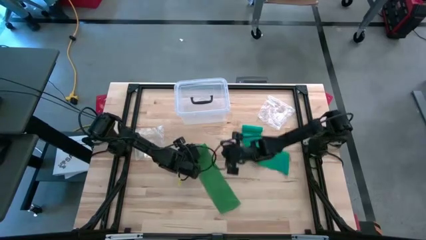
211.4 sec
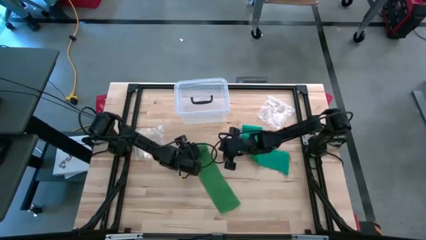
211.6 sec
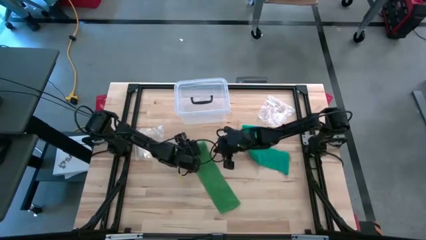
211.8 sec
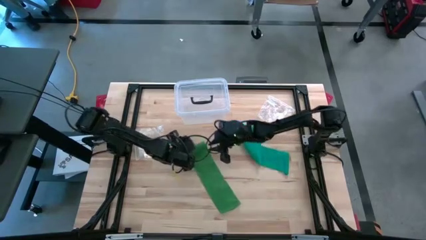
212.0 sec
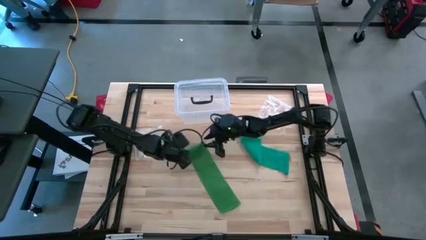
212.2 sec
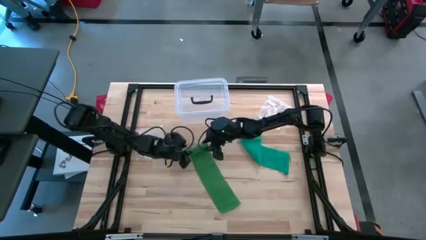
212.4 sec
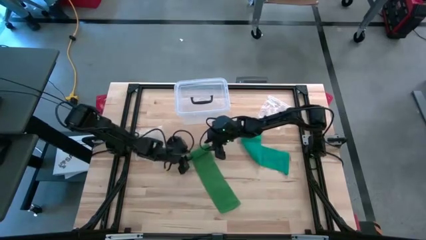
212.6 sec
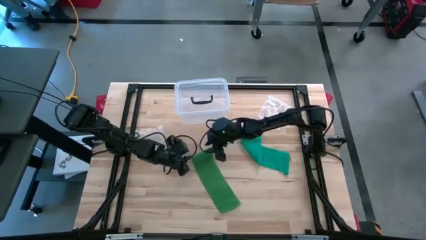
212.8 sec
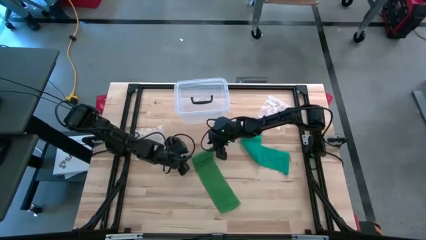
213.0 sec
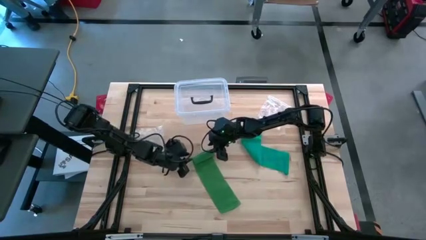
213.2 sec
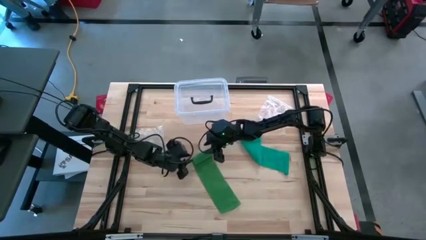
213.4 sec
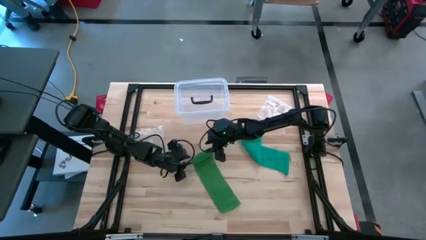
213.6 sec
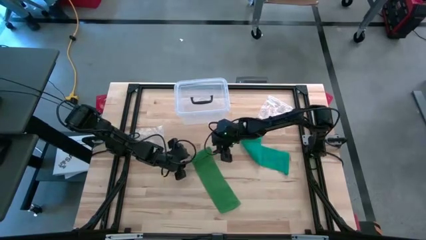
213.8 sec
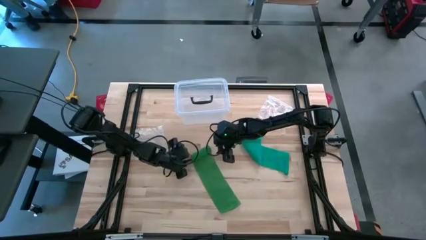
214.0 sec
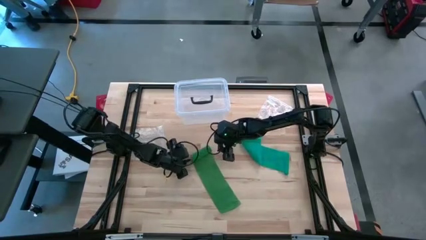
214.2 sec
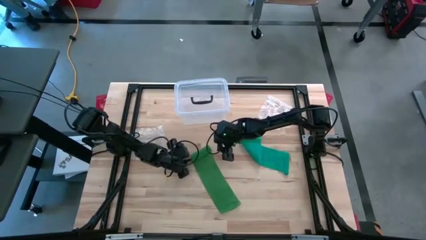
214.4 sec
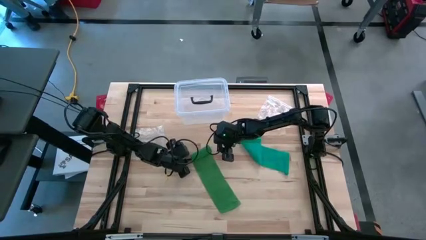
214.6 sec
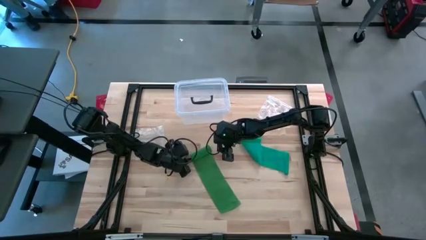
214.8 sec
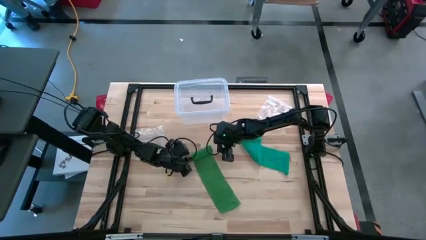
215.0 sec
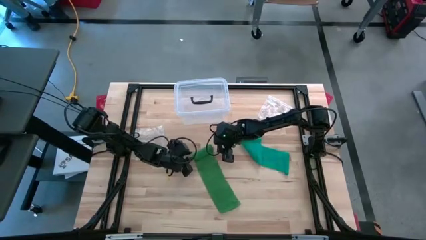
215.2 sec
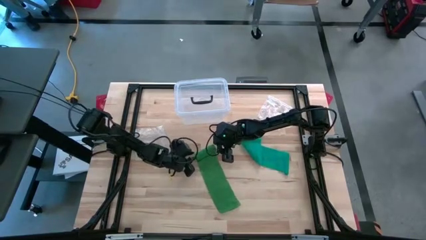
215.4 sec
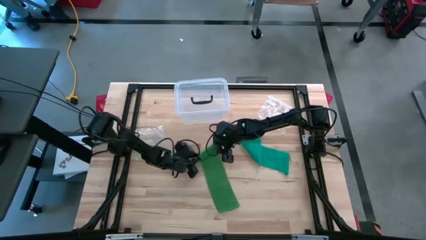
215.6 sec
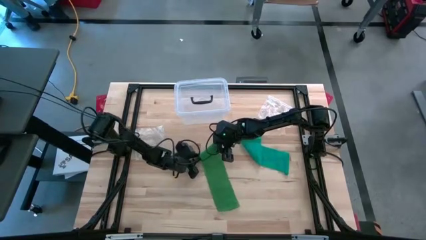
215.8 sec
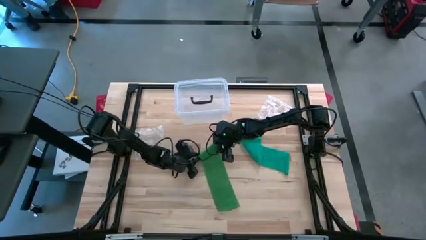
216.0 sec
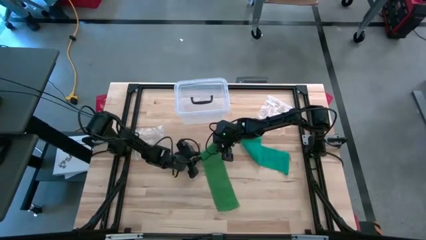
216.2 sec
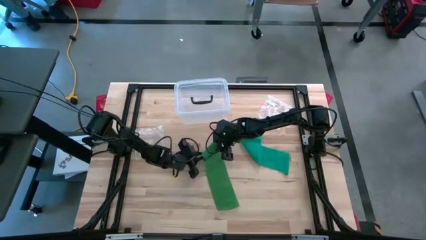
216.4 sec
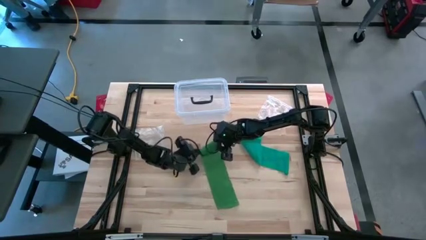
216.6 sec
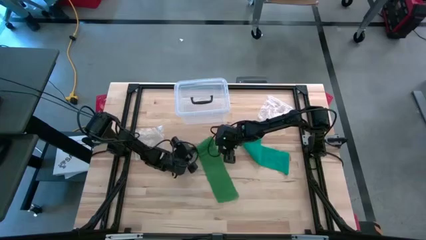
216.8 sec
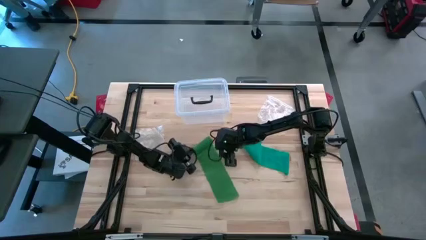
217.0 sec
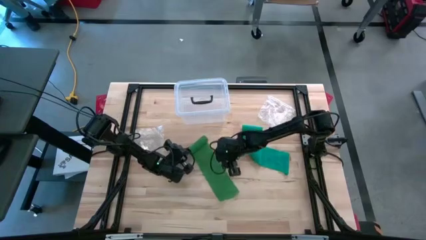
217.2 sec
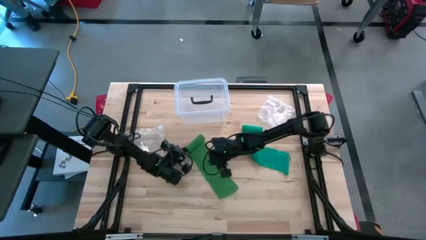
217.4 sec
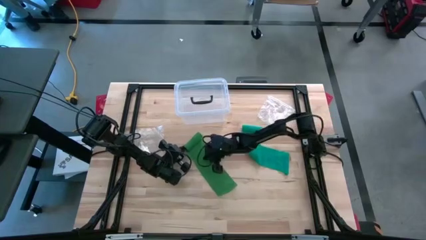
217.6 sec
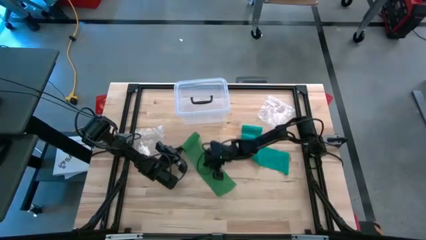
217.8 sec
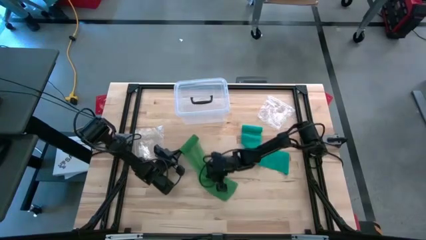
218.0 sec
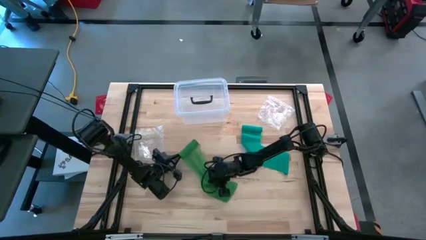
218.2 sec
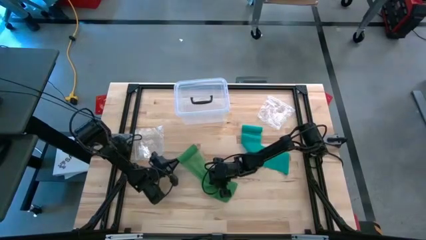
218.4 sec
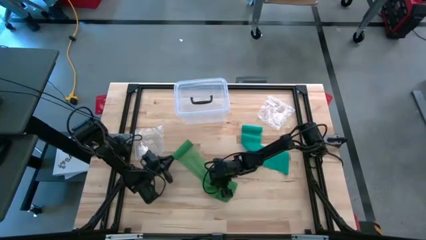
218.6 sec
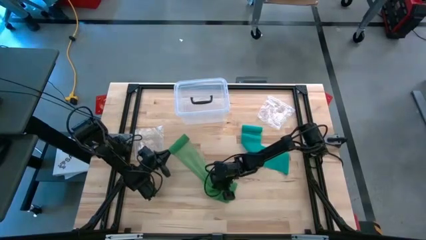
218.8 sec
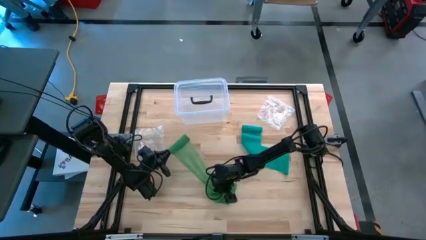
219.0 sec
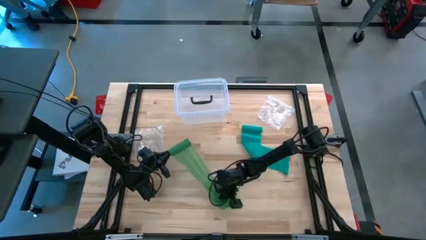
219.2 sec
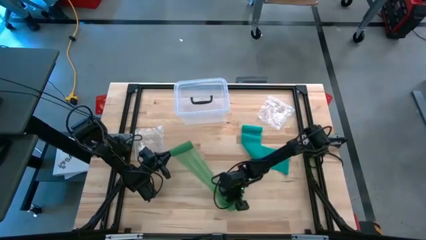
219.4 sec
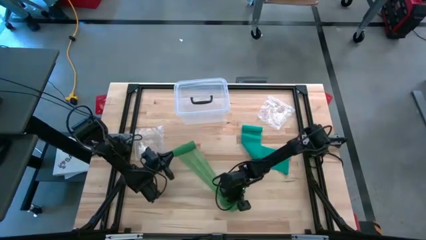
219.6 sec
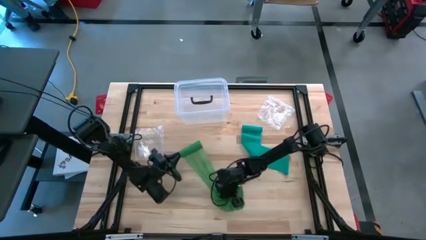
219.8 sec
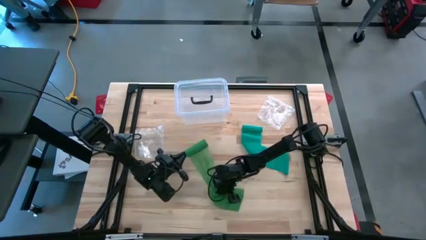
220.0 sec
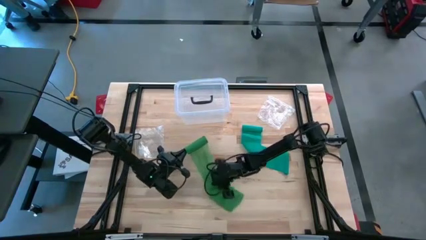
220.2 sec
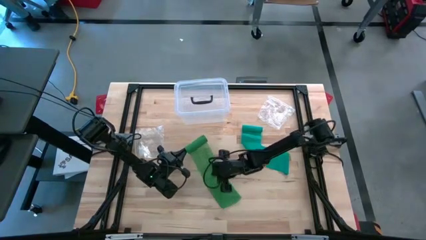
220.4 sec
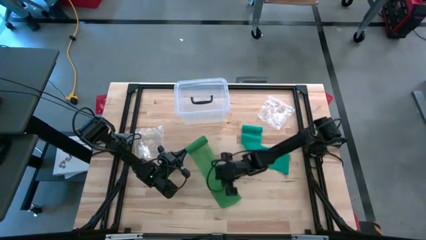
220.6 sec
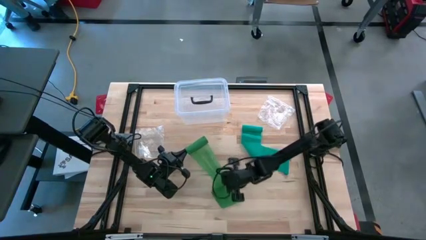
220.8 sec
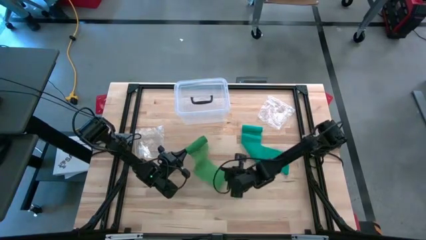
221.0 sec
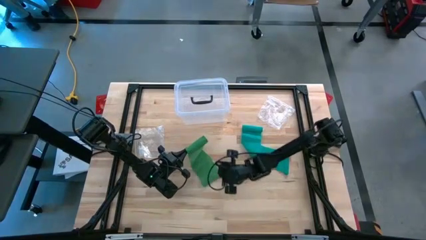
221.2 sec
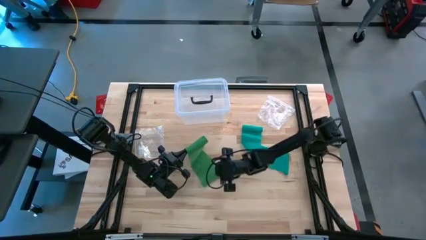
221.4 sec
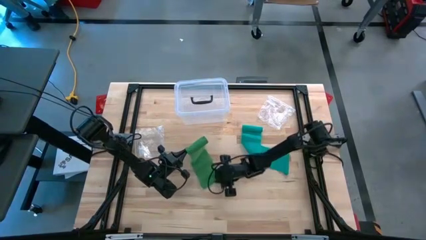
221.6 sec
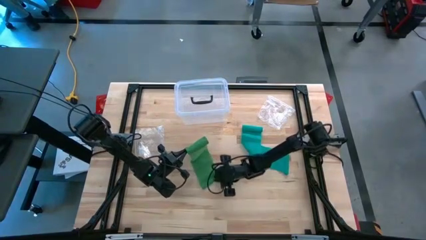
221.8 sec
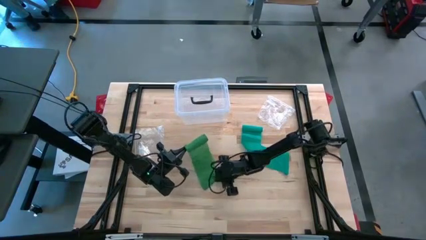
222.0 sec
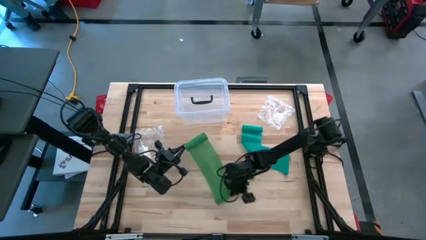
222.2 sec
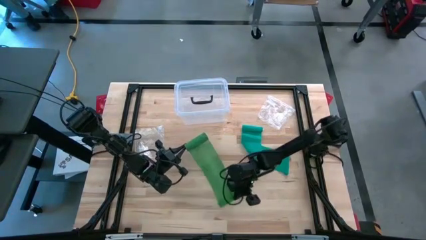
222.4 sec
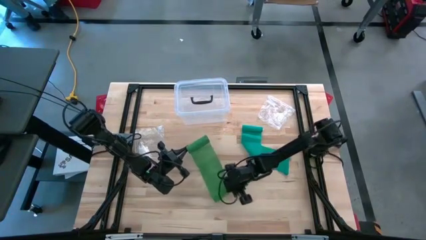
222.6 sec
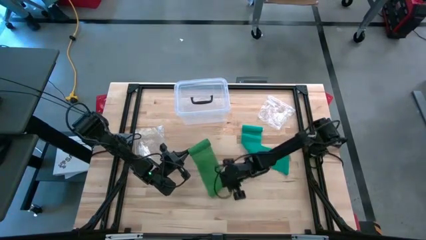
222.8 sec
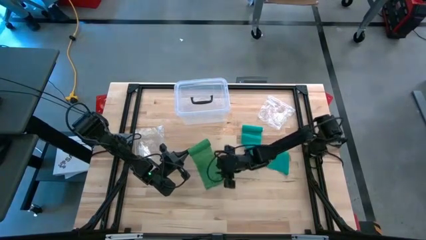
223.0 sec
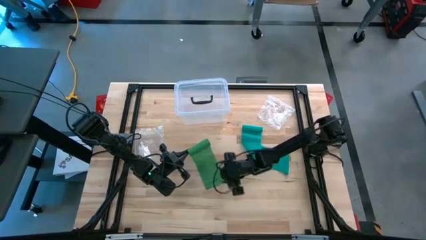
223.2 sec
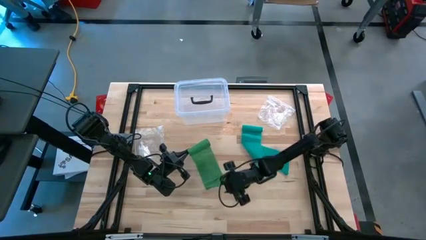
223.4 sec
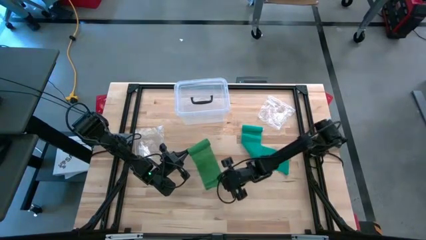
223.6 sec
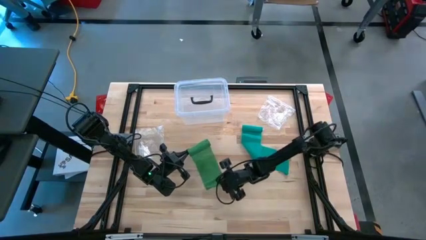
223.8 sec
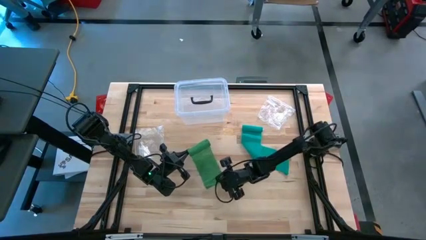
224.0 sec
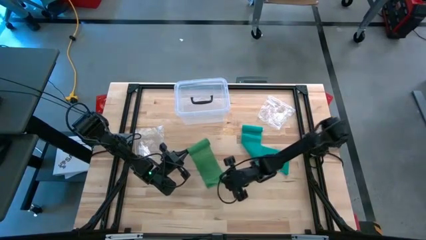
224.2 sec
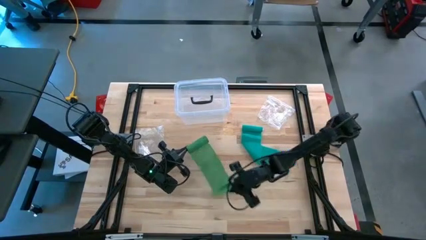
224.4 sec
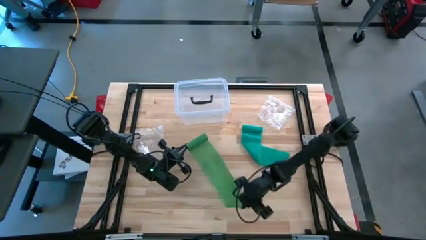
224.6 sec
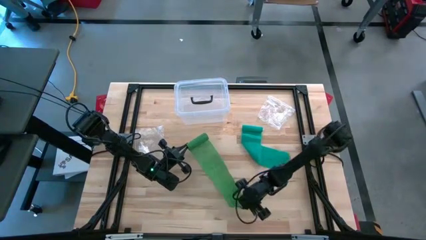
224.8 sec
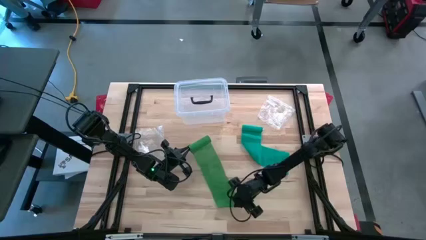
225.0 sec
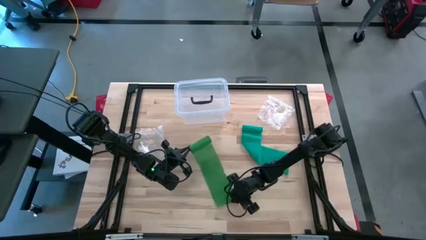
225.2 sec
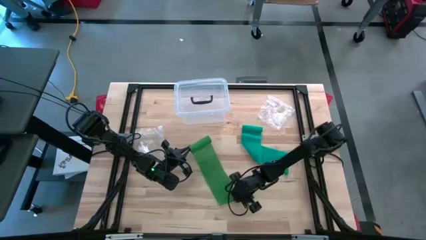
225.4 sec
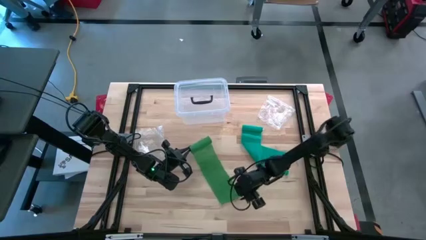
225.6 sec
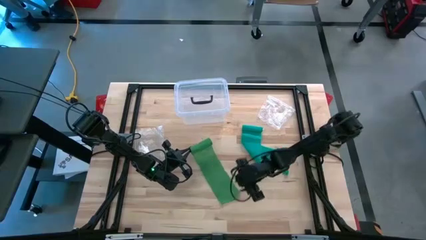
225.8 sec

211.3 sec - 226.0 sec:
Task: Roll bandage
Roll the green bandage
